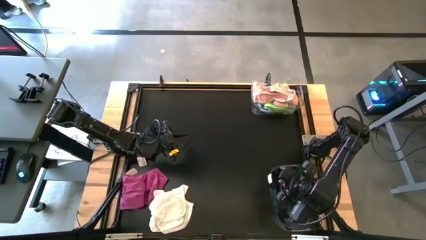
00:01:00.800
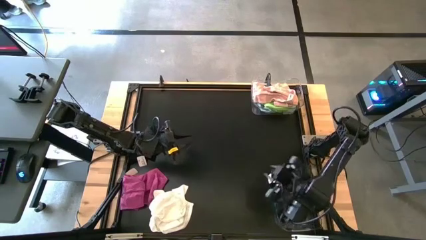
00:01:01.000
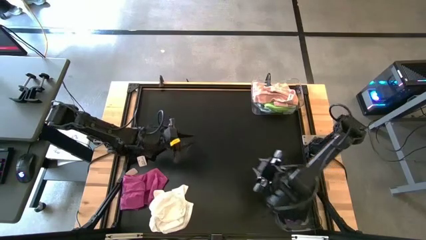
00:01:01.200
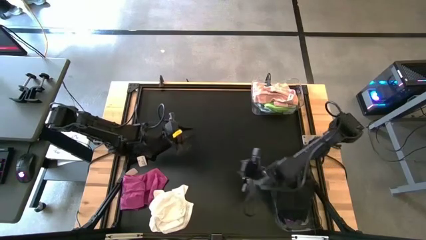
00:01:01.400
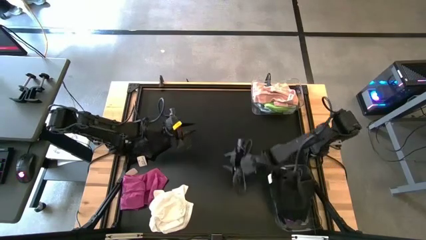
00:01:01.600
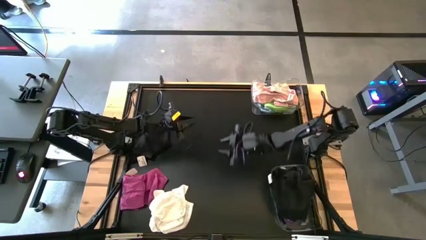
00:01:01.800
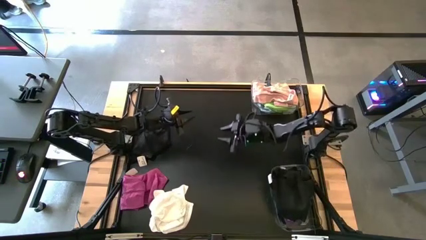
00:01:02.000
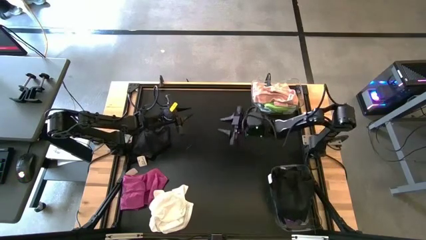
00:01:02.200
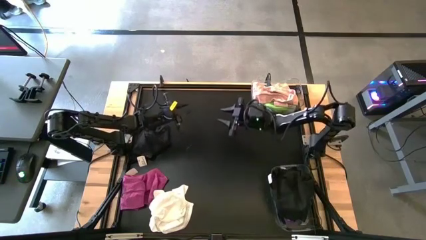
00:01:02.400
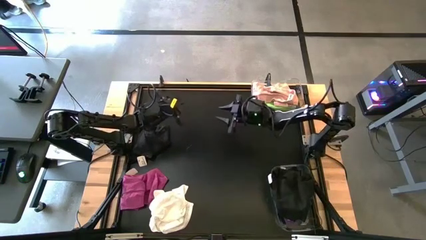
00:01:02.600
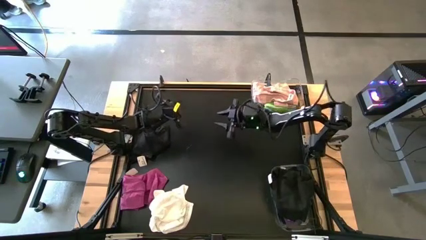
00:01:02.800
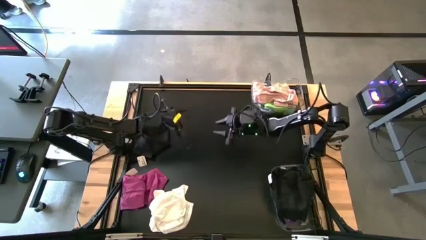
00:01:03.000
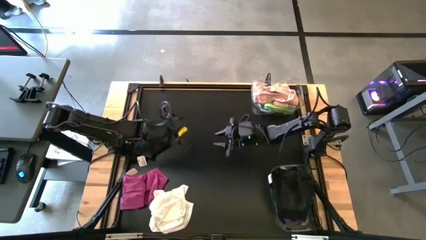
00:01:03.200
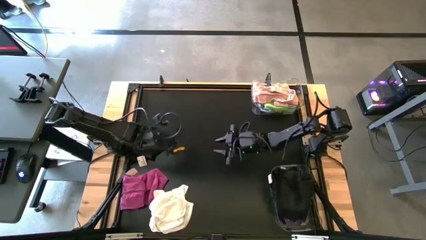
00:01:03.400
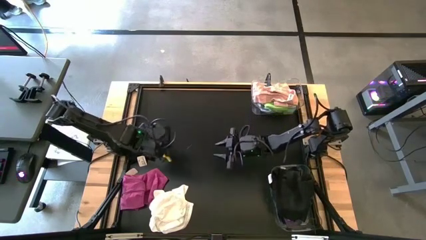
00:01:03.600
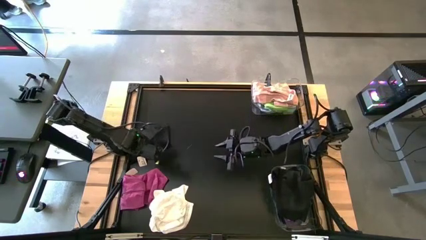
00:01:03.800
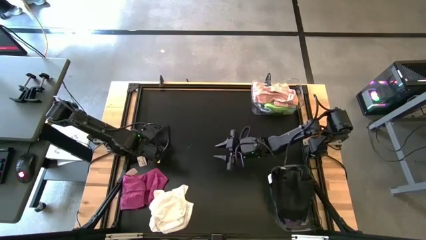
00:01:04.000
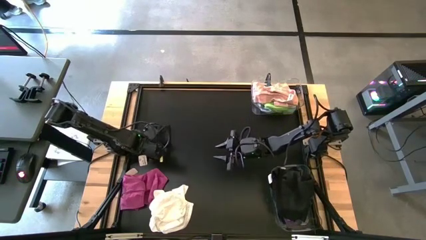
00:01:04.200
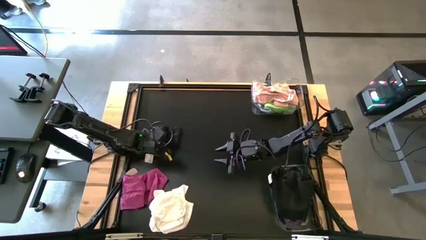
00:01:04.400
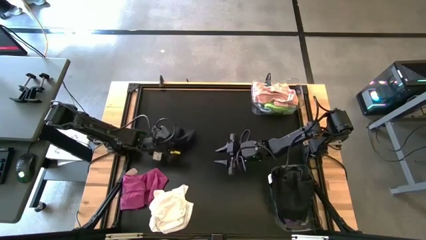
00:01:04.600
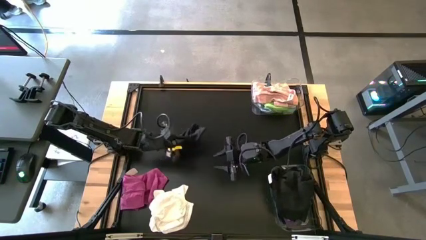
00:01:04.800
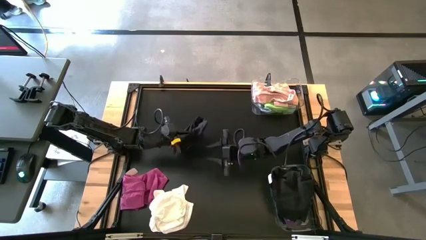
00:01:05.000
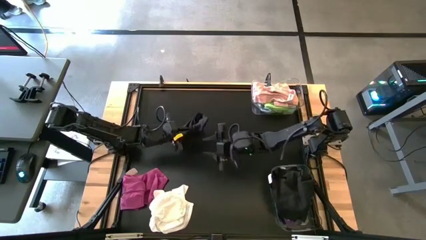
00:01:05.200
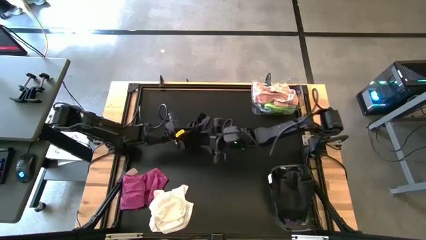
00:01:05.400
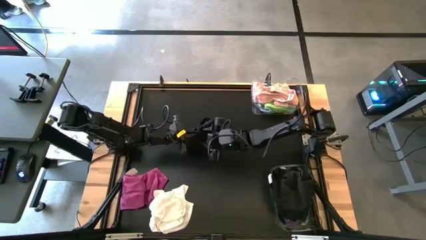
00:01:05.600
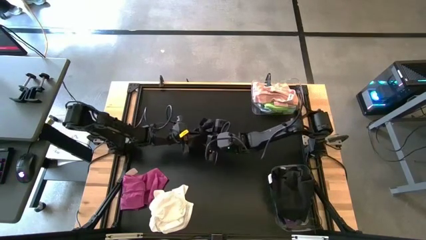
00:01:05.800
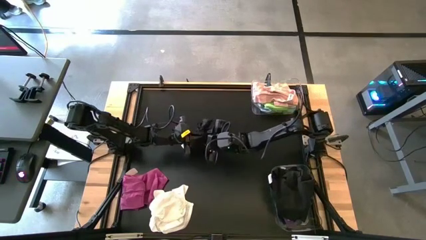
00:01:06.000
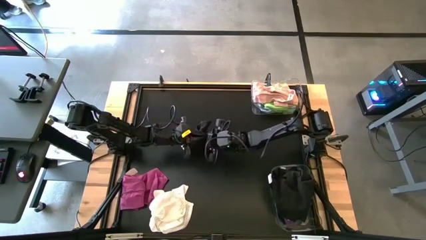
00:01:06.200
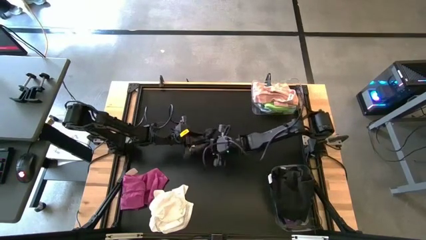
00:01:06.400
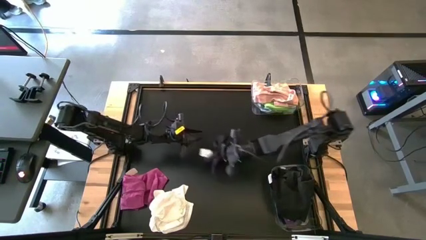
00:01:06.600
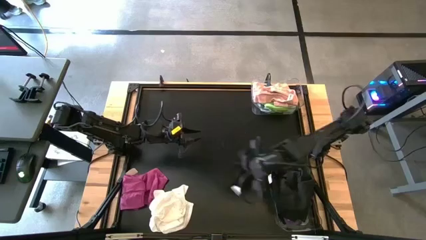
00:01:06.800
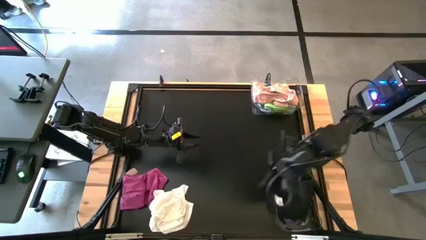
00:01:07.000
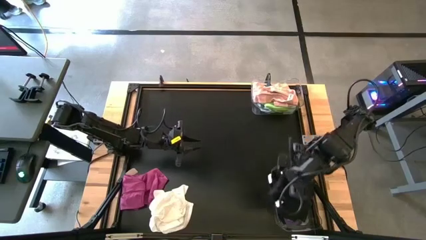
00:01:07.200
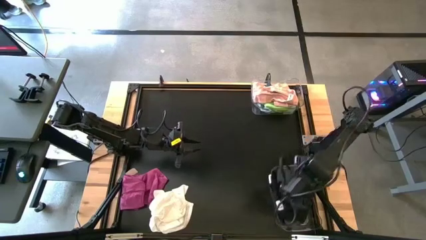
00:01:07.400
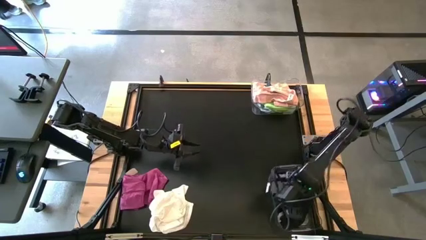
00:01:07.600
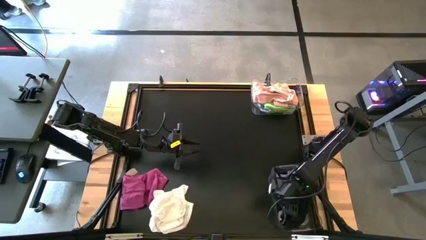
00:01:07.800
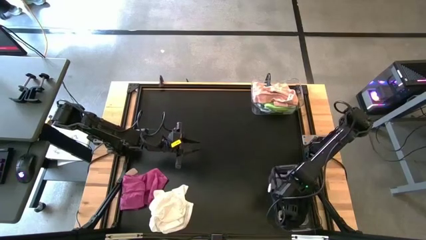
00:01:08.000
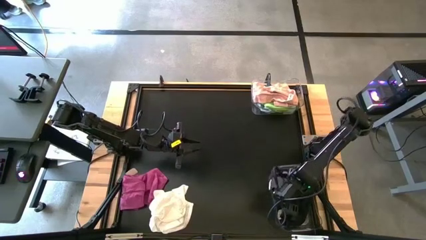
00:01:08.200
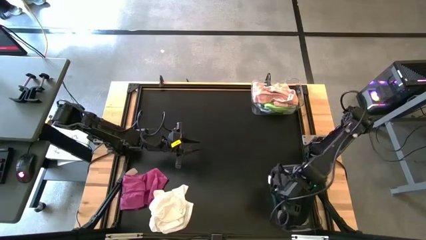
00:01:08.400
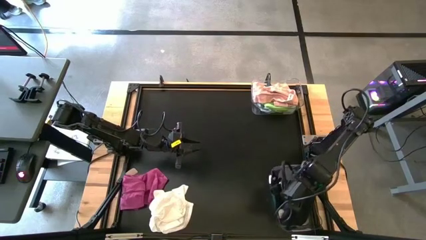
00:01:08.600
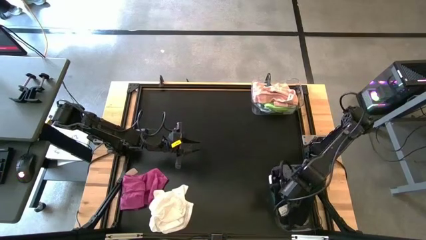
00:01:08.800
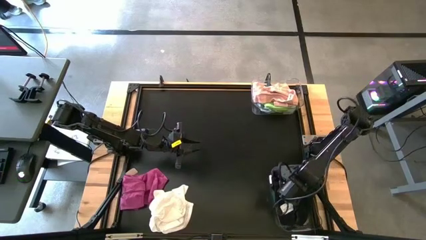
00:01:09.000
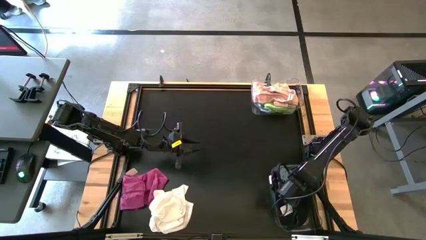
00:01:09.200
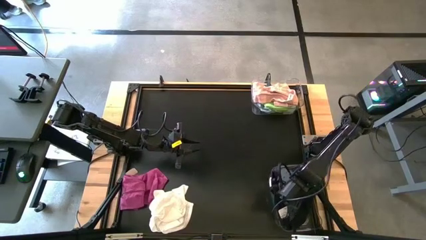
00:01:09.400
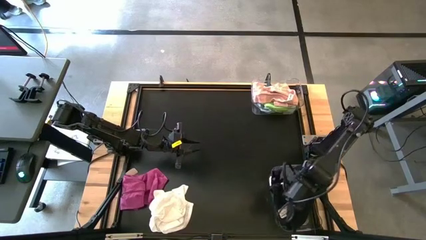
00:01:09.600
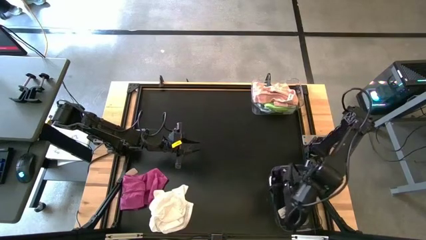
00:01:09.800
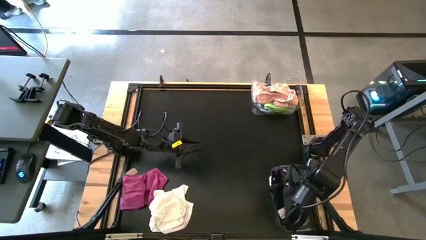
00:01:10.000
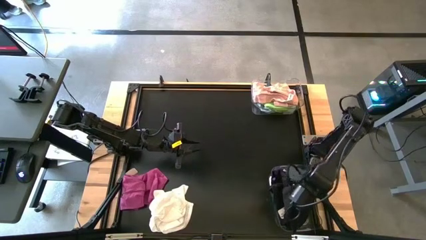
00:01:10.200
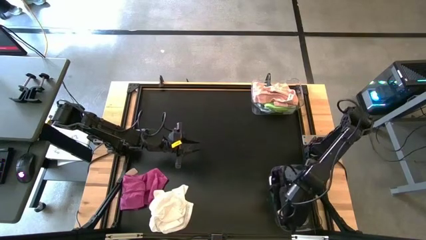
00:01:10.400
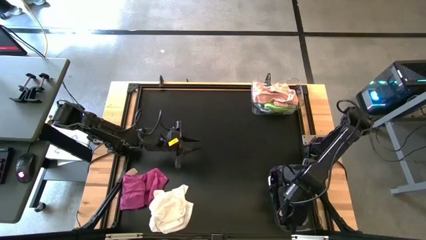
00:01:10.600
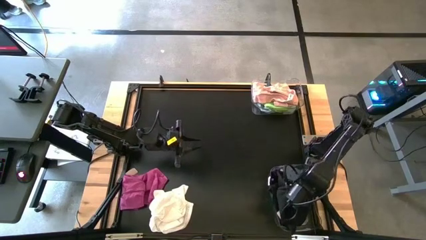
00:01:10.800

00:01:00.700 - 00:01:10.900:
Task: Sort towels by color in basket
Put the black towel into the bottom transparent bin

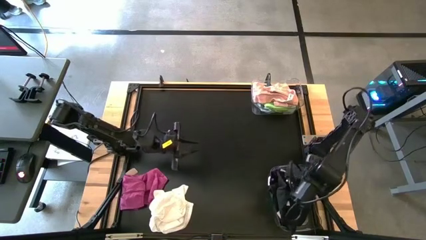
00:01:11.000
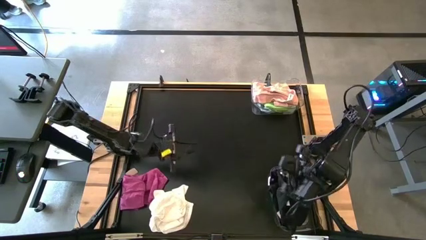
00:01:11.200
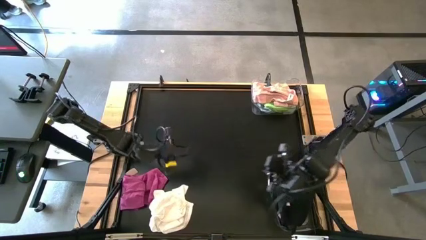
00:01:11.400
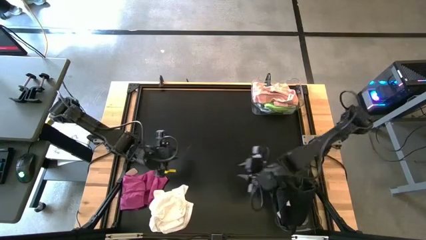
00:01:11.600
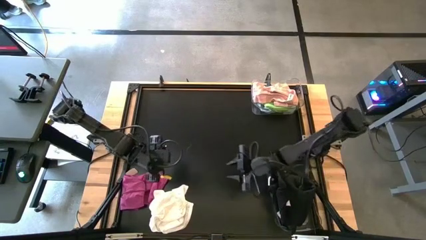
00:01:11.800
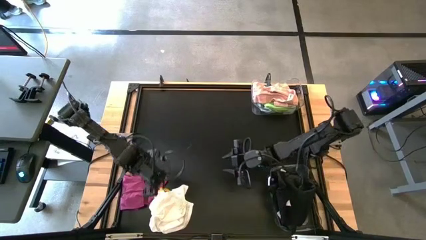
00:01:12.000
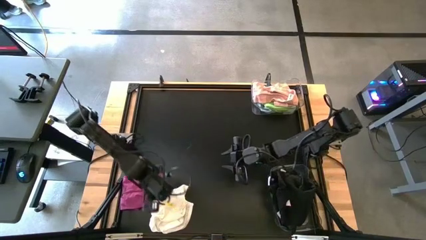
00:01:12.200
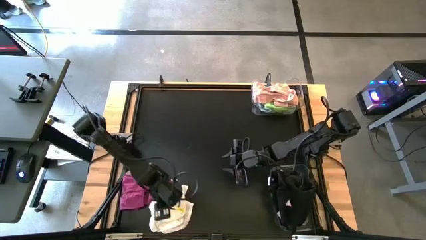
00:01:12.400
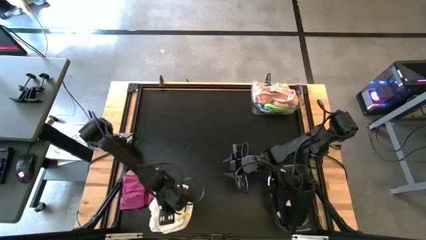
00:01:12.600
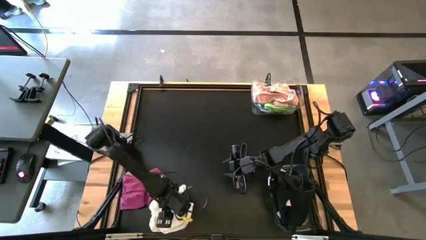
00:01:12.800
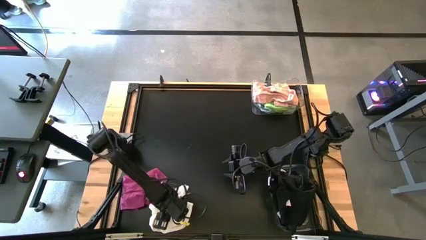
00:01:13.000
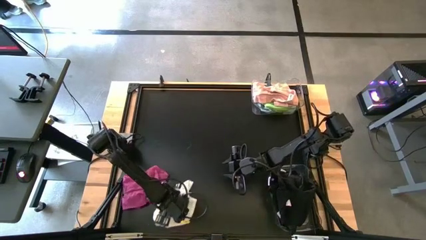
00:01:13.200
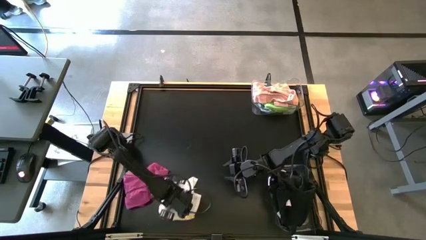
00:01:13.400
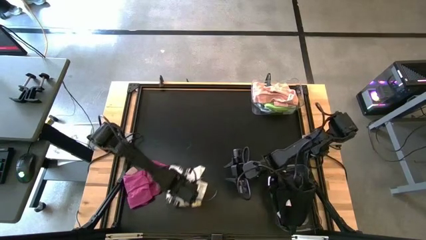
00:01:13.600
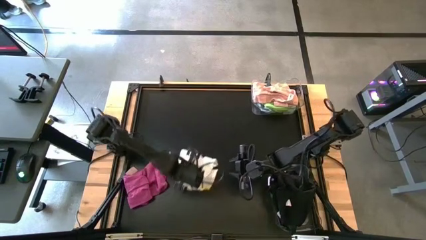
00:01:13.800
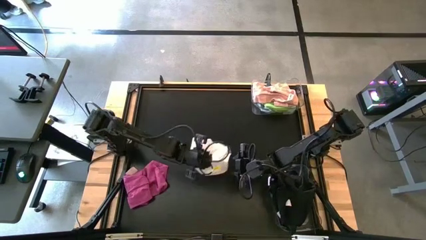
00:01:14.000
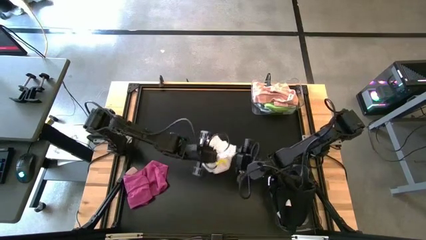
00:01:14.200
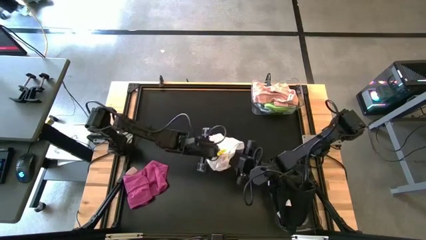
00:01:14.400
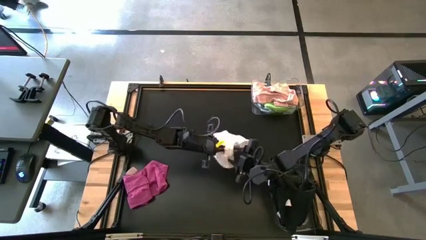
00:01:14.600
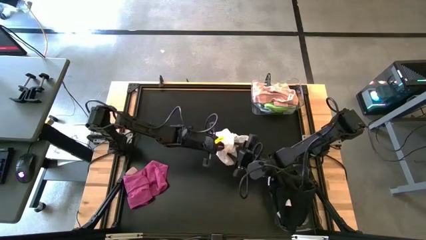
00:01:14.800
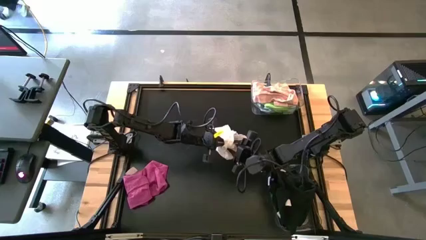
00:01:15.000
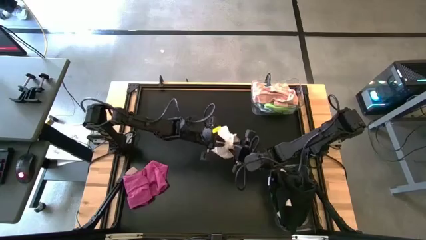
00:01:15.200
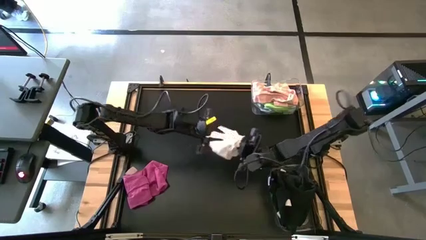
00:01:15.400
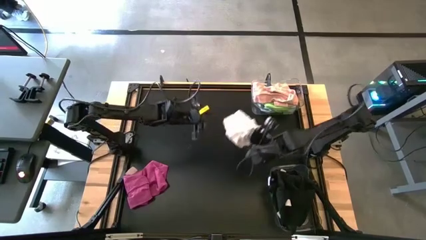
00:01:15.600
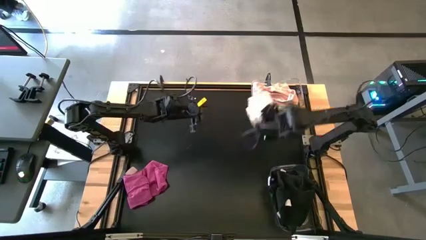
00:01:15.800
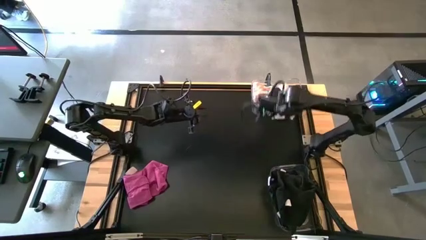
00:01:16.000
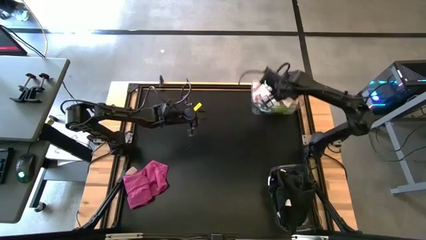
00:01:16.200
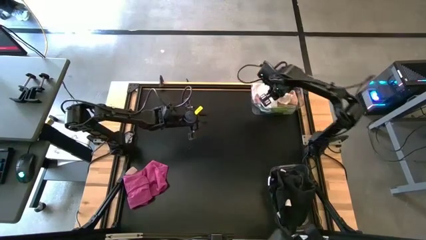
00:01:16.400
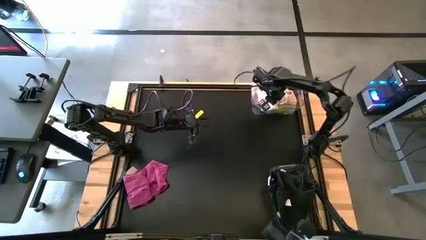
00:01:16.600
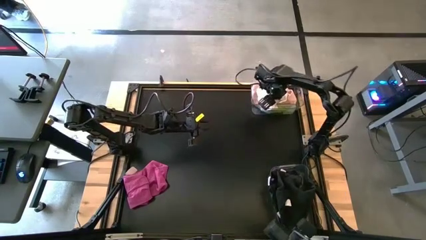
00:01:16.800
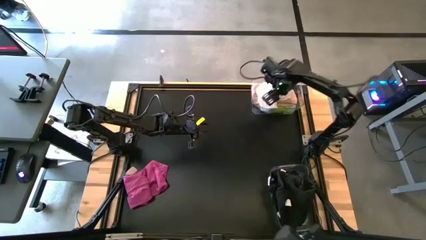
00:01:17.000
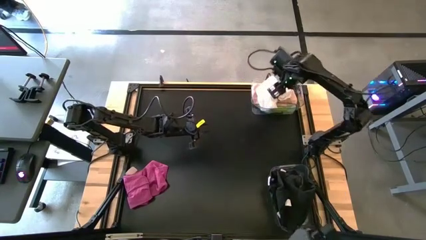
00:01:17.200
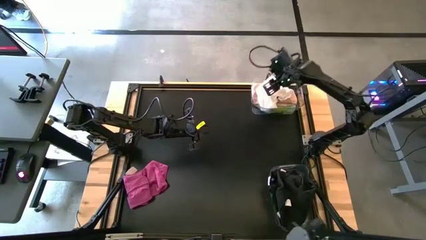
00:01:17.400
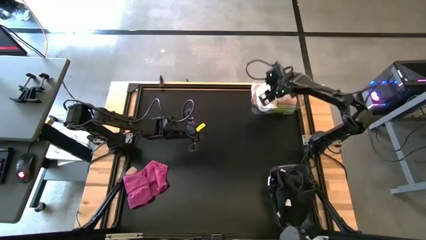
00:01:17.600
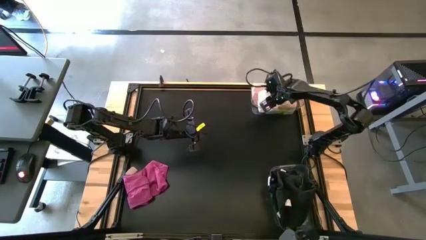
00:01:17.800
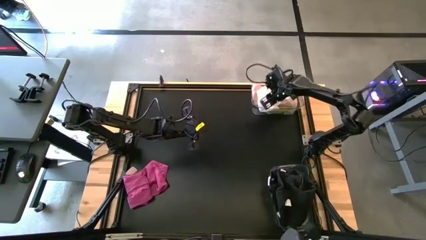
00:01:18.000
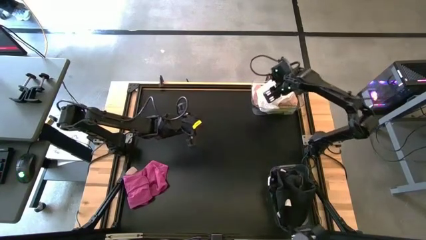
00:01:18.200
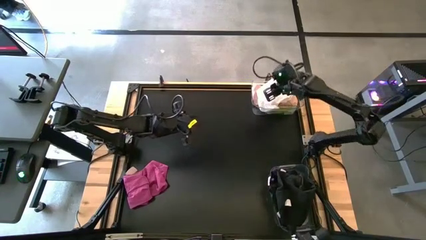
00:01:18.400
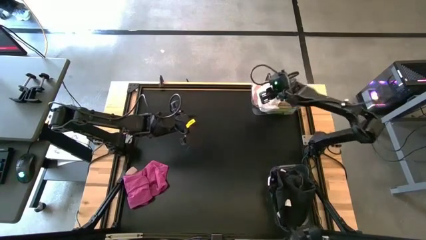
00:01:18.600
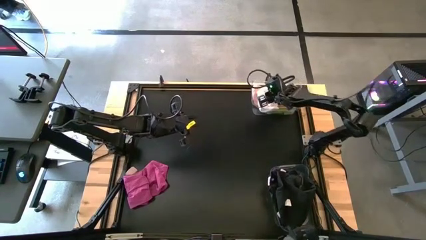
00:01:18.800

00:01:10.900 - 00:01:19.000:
Put the white towel into the top transparent bin
